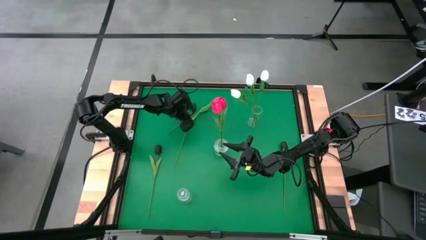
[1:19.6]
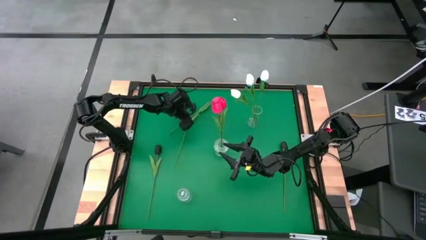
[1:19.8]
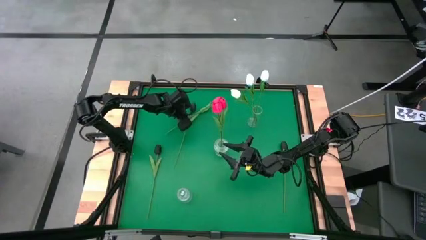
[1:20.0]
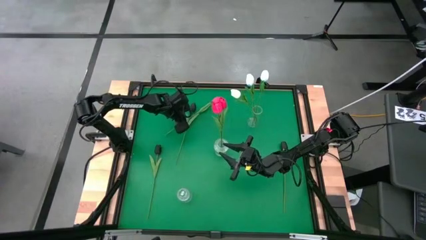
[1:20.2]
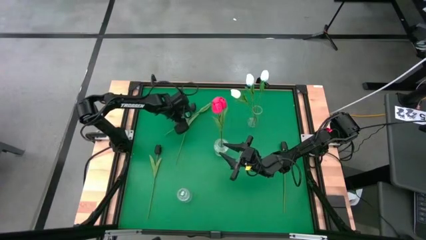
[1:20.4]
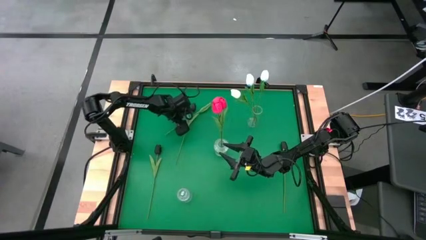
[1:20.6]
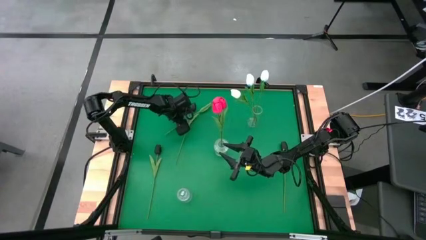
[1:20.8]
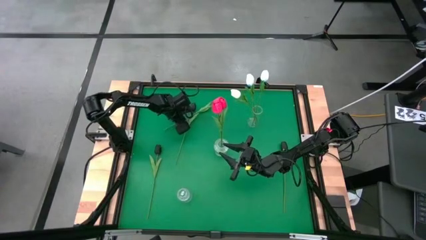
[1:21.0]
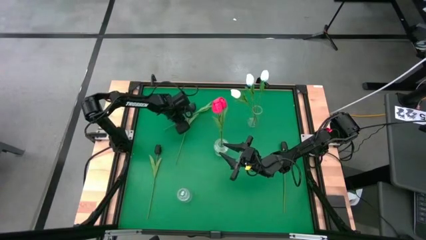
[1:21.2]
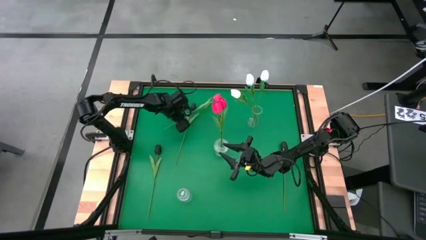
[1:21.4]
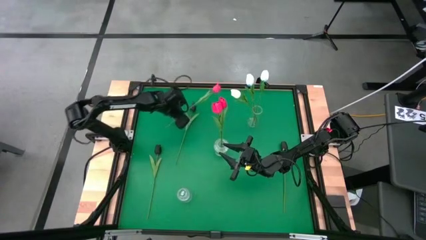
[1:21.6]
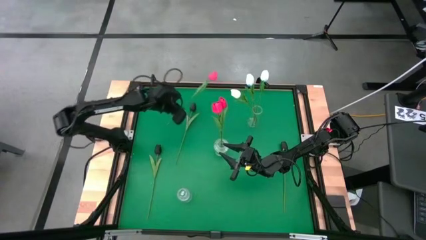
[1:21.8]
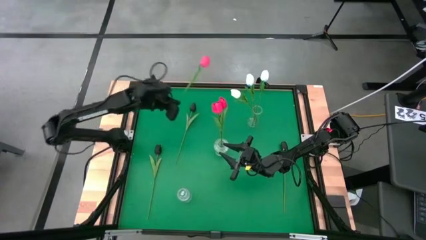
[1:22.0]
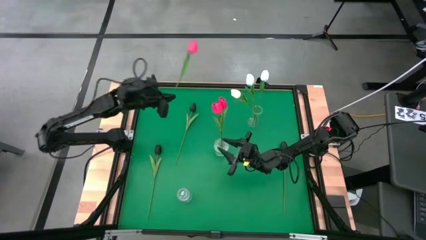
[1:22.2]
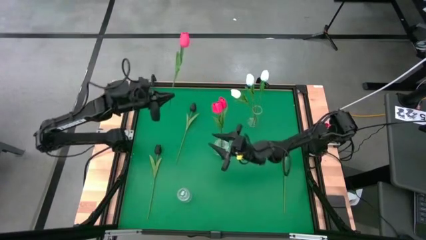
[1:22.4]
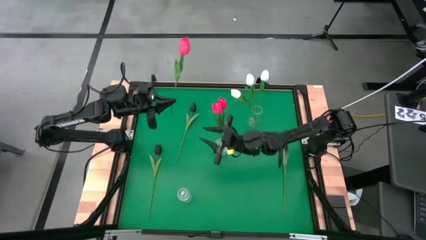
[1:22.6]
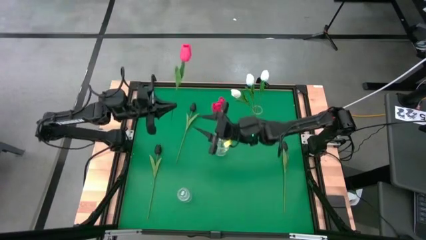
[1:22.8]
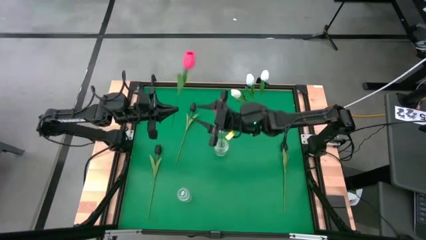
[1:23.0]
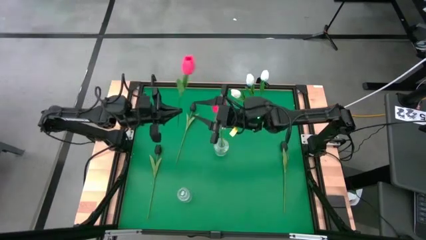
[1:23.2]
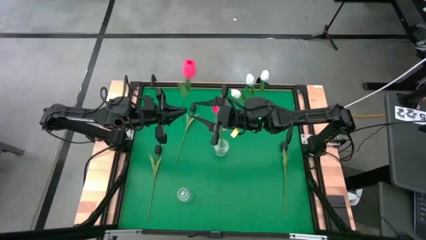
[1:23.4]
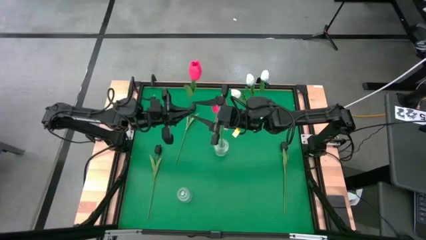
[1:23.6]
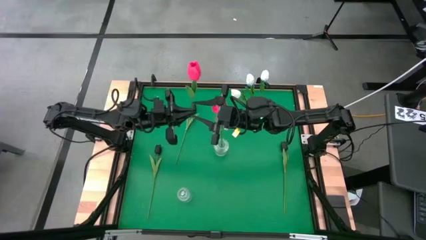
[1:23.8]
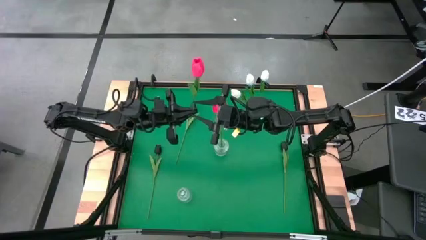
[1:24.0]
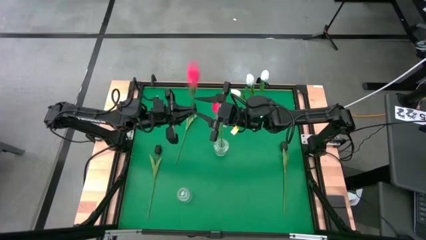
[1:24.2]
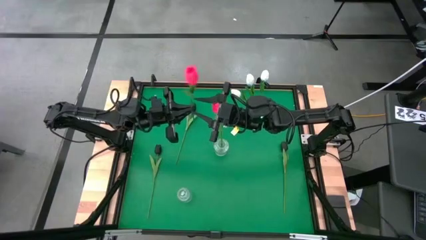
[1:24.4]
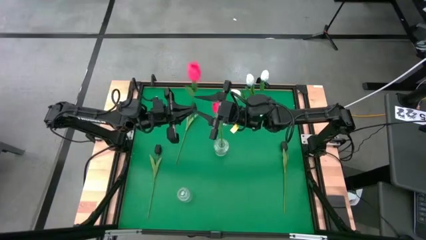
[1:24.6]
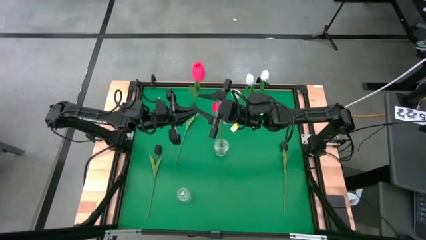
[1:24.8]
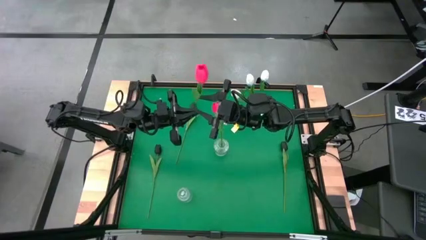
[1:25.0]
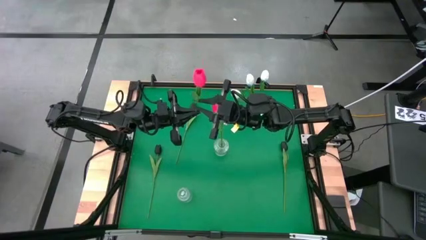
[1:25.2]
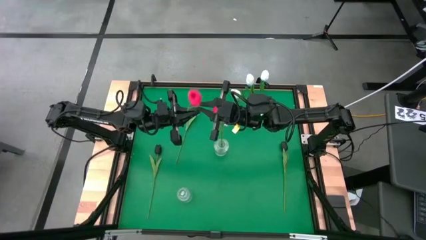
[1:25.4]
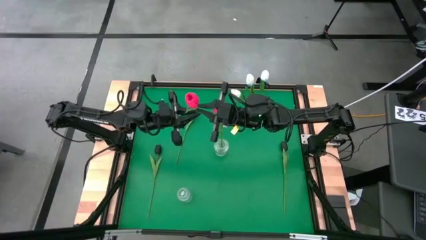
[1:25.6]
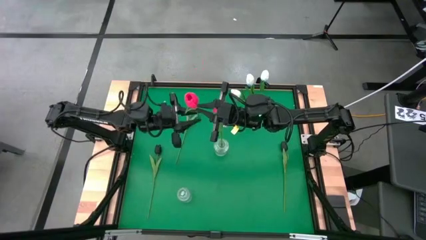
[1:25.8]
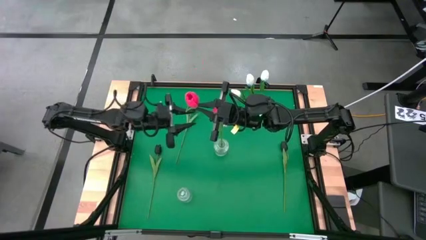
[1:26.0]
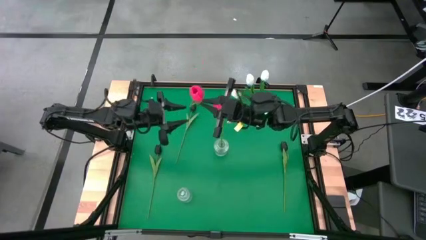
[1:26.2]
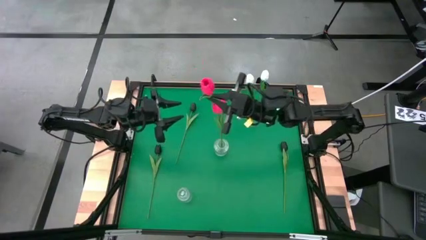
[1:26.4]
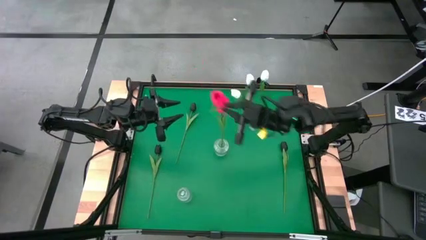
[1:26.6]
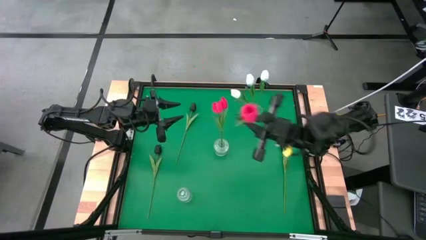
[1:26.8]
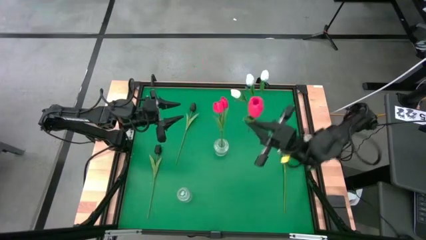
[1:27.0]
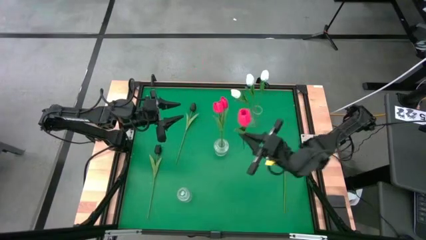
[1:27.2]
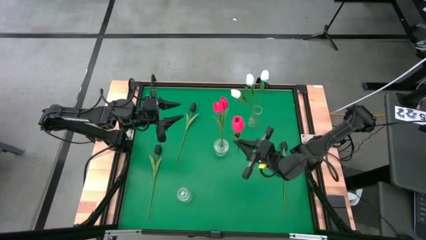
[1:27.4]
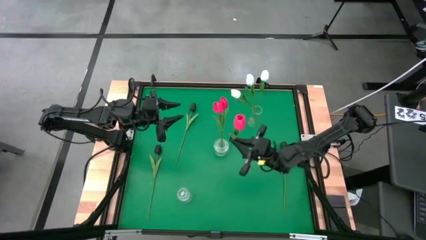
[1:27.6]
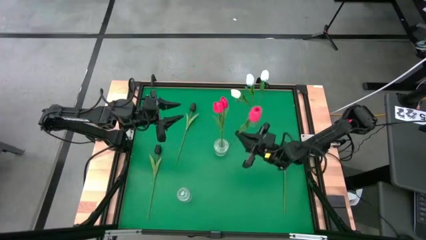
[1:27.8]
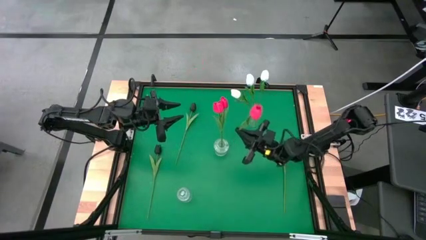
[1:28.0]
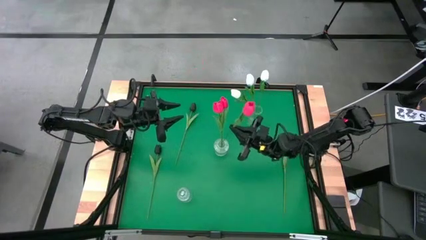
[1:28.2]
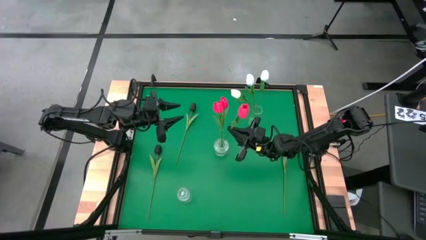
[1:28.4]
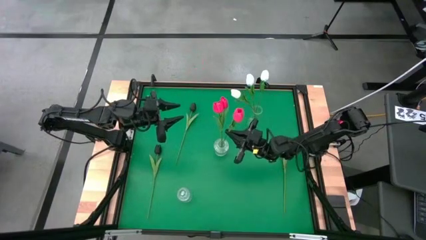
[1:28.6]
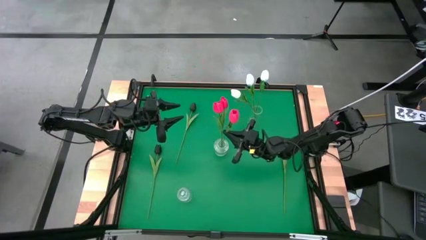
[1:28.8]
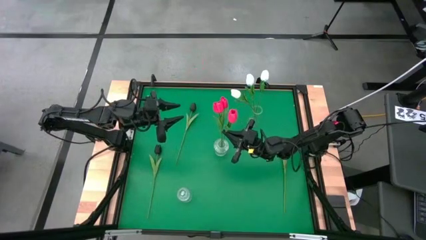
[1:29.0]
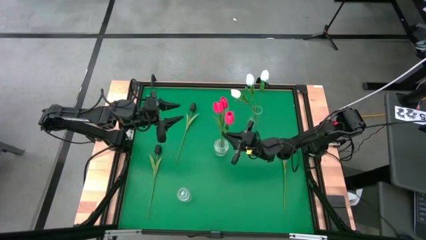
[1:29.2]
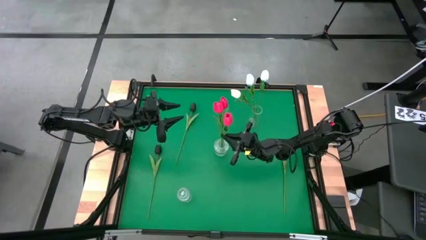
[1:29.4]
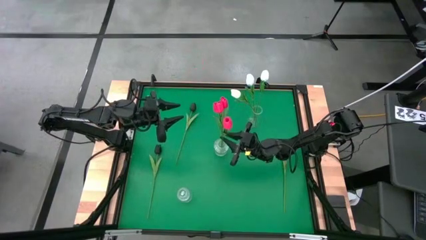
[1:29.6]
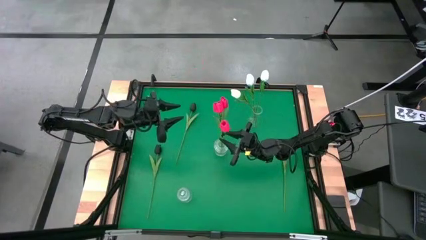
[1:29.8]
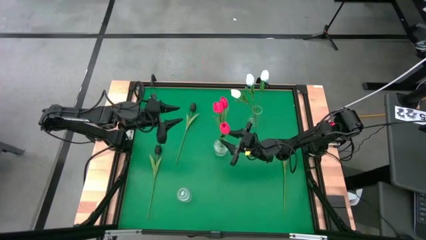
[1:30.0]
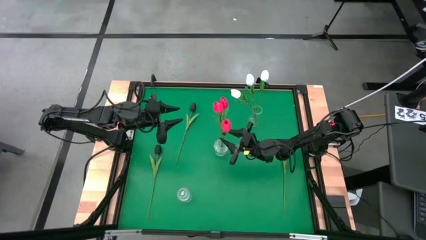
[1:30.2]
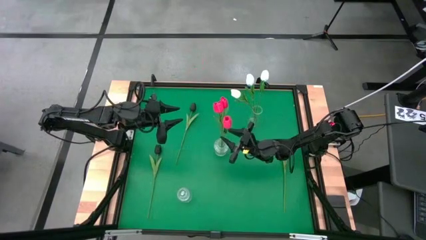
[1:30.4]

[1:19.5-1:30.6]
Task: Sort flowers into vase by color
Put the red tulip into the middle transparent flower vase

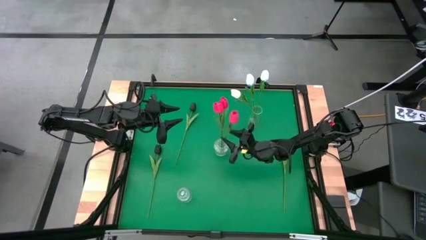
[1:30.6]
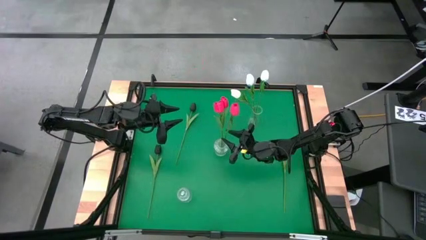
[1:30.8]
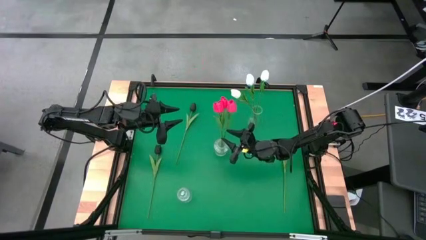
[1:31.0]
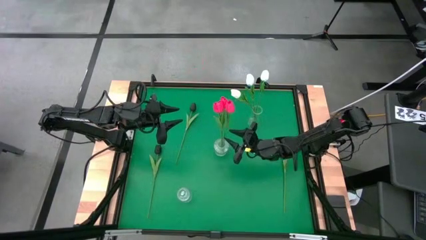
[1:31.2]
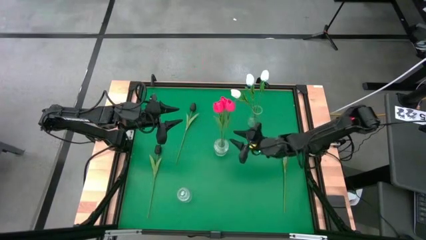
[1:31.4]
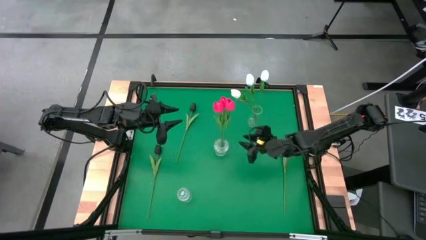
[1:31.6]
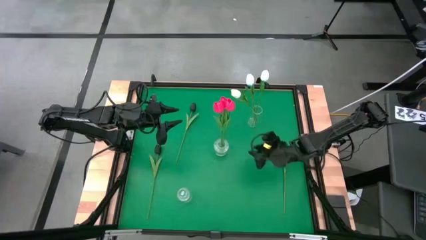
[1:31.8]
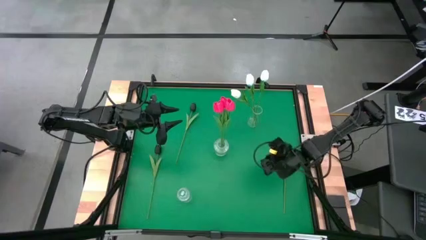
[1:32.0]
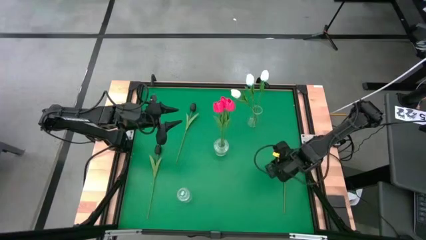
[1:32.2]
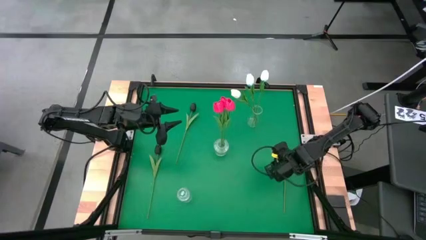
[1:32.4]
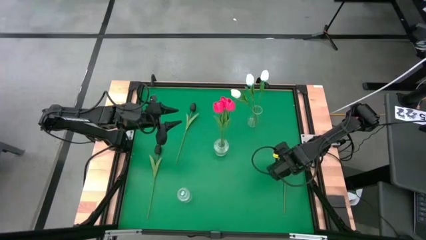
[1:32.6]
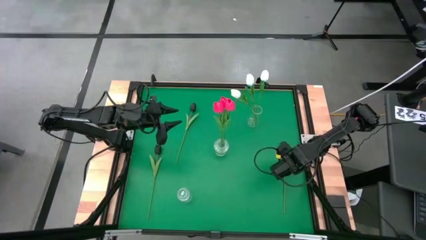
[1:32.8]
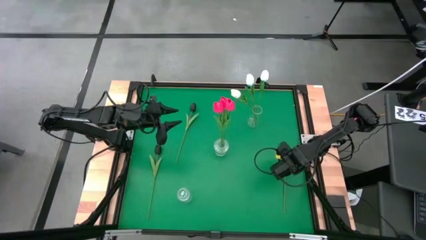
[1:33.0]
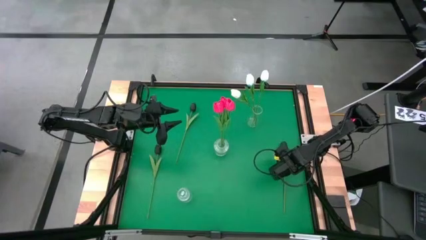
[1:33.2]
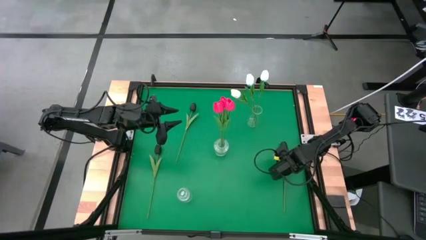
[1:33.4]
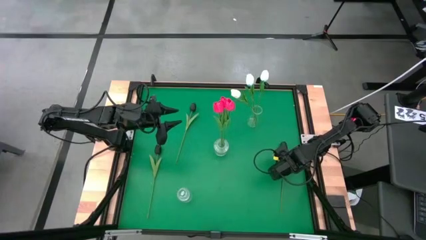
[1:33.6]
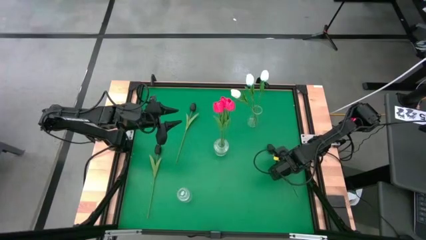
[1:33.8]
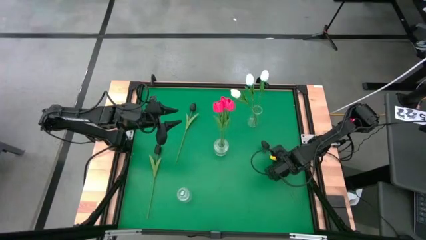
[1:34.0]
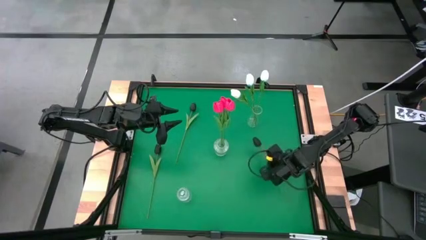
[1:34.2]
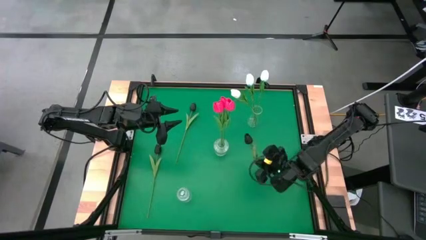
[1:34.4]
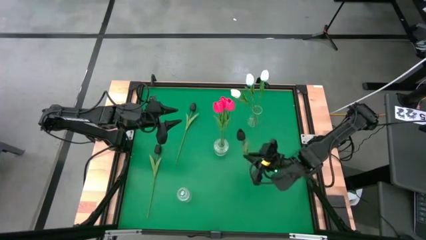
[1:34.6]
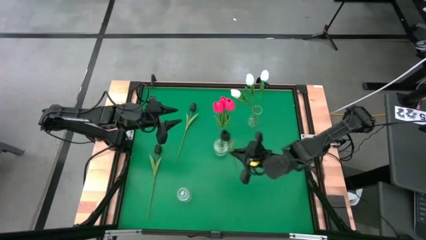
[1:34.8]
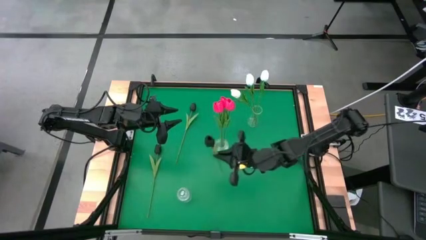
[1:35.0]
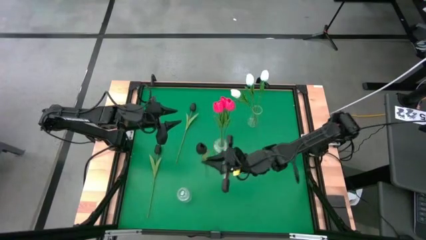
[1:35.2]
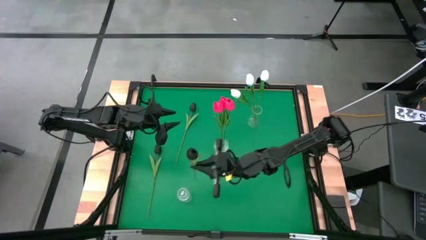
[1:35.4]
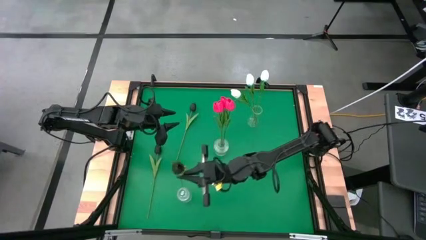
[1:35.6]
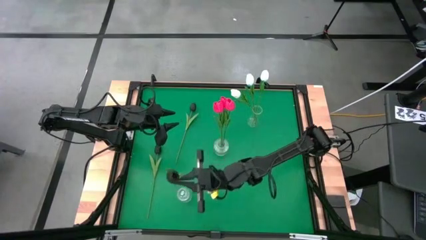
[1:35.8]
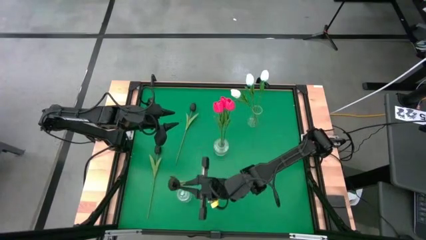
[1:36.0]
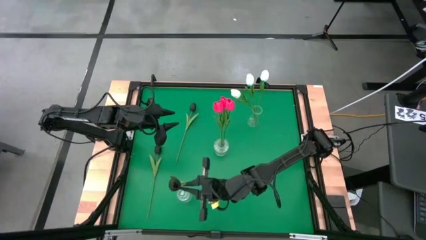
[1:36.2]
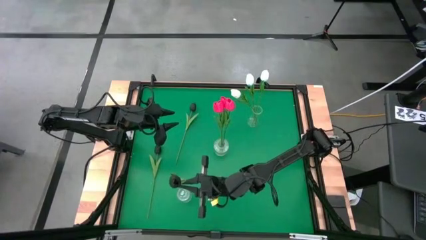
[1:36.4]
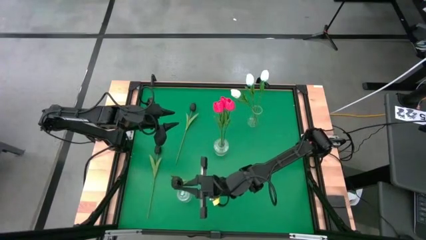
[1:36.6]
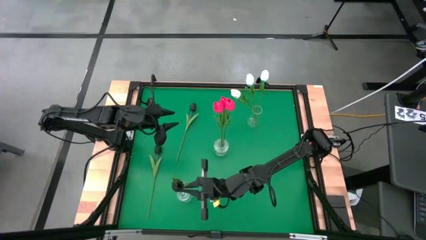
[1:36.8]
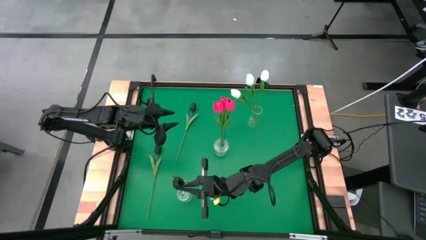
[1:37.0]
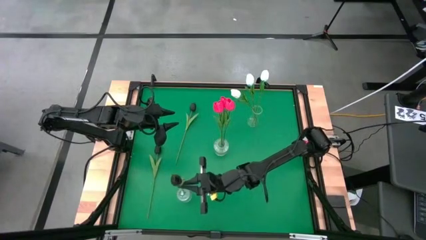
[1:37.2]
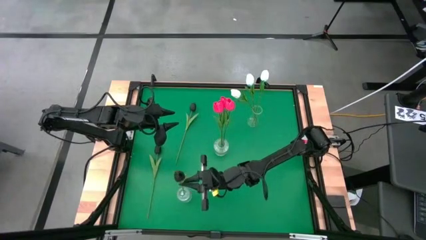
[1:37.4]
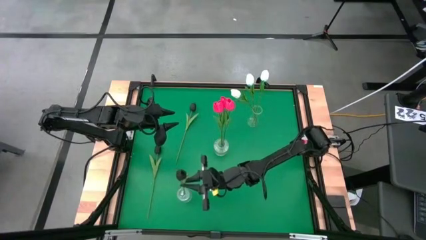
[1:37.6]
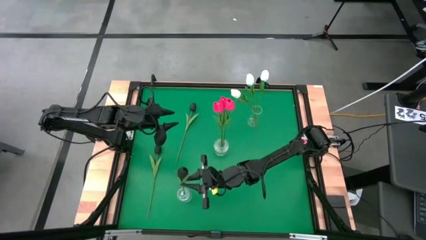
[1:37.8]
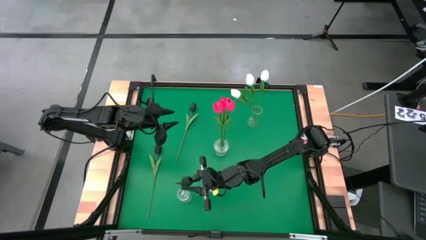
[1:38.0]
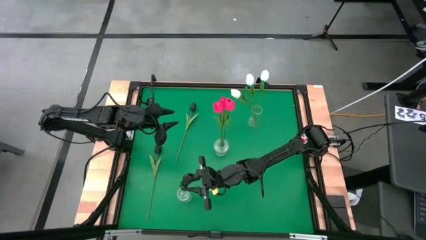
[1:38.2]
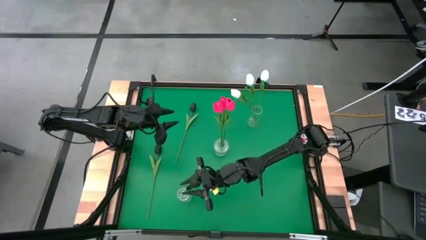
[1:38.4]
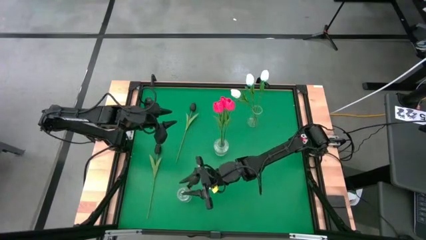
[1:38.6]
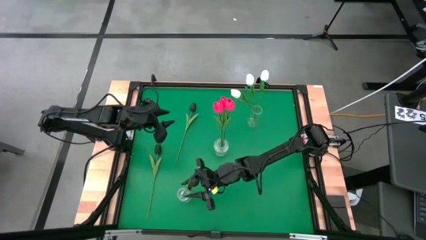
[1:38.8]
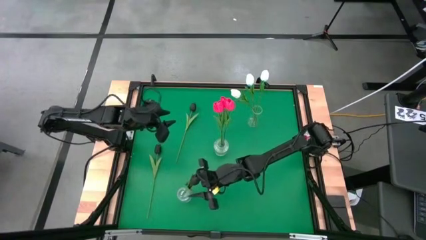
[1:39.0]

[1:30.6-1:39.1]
Put the bottom right black tulip into the bottom transparent flower vase
